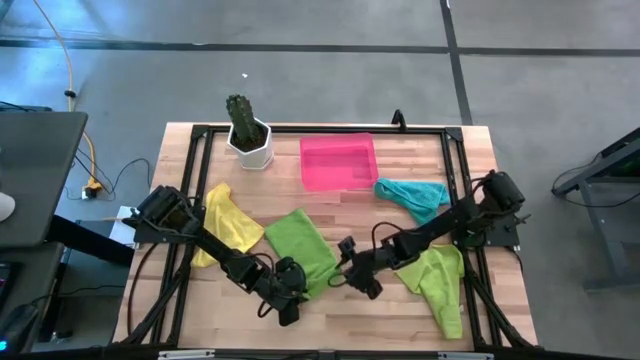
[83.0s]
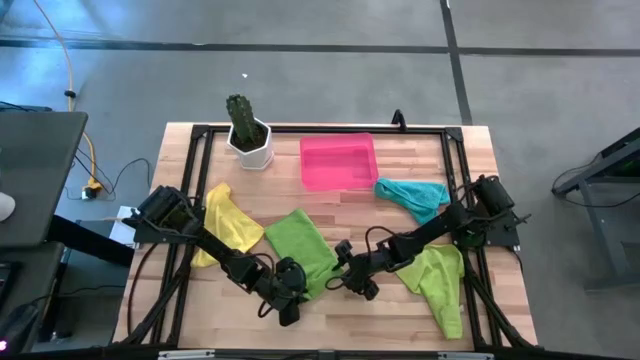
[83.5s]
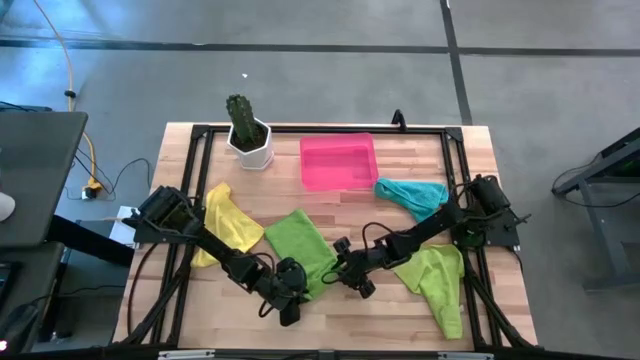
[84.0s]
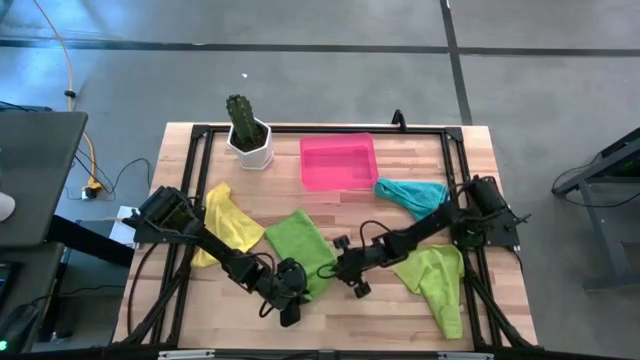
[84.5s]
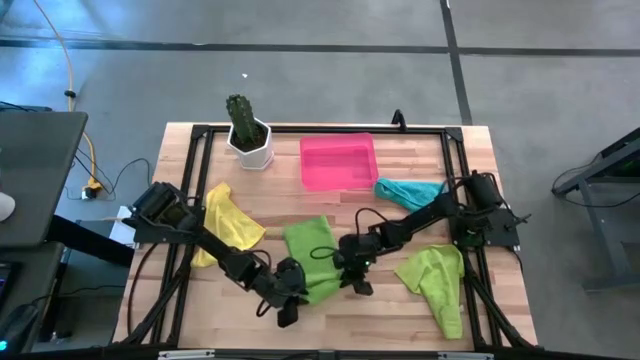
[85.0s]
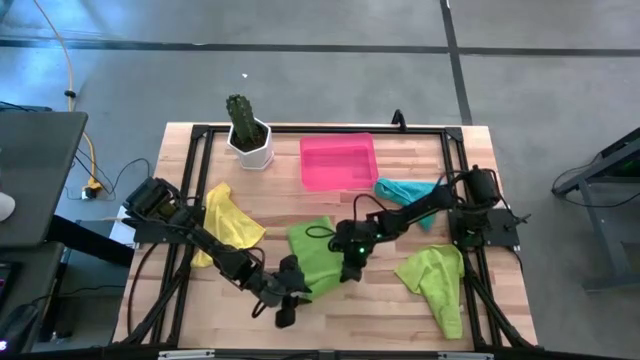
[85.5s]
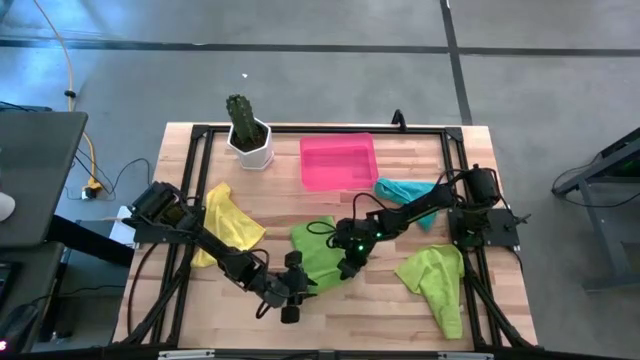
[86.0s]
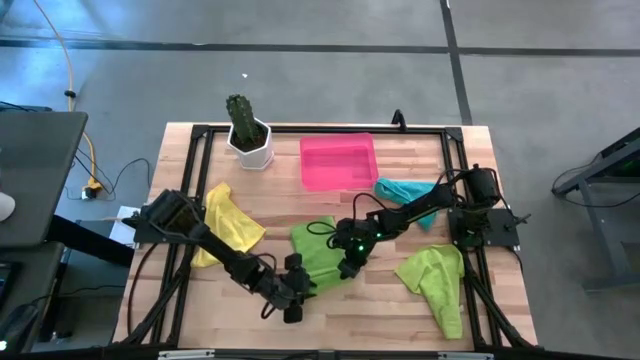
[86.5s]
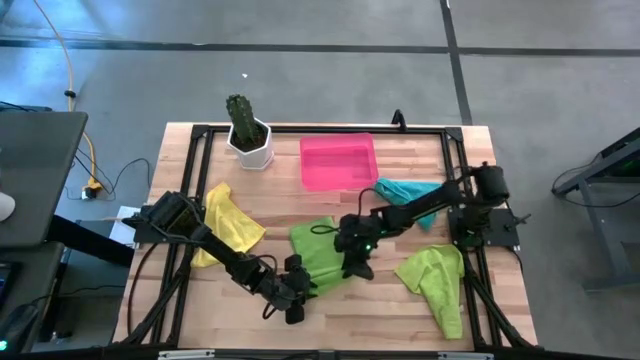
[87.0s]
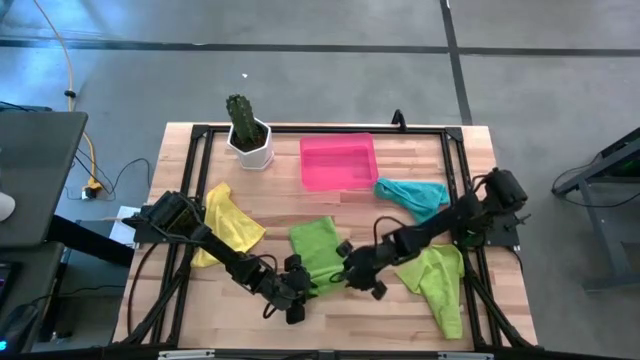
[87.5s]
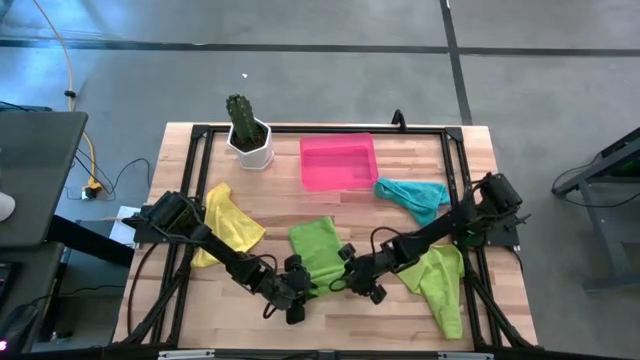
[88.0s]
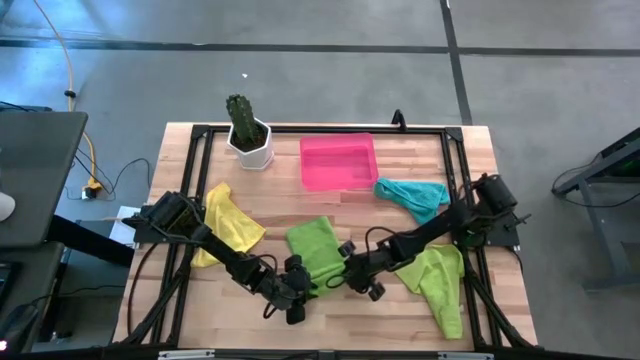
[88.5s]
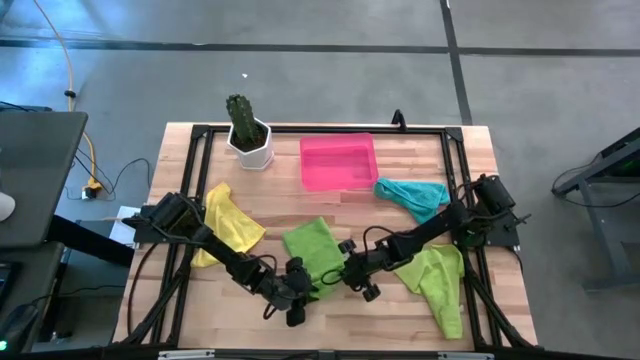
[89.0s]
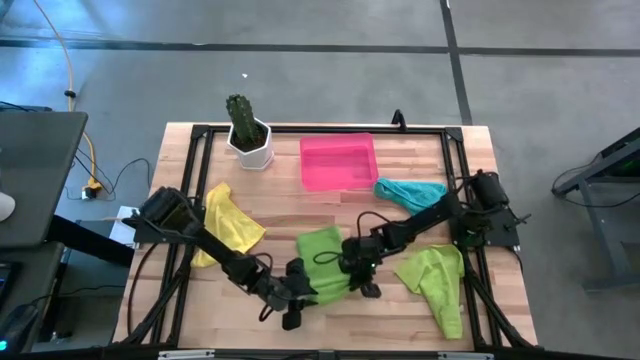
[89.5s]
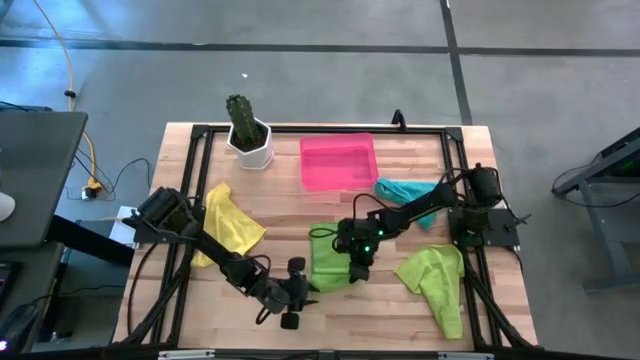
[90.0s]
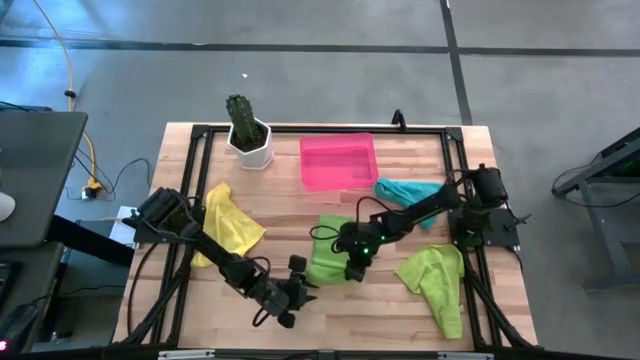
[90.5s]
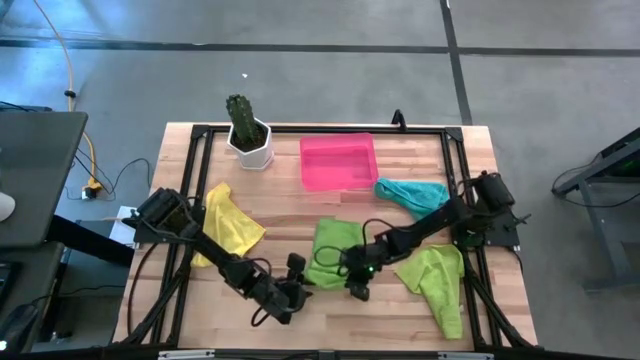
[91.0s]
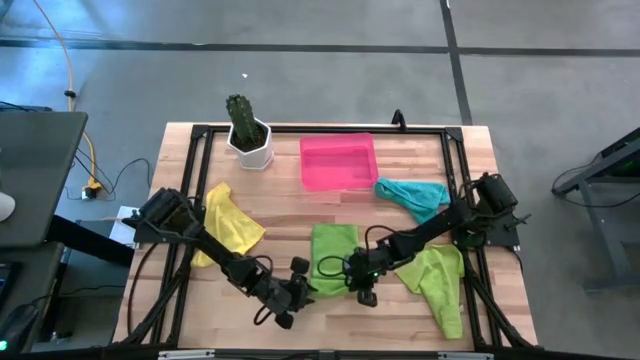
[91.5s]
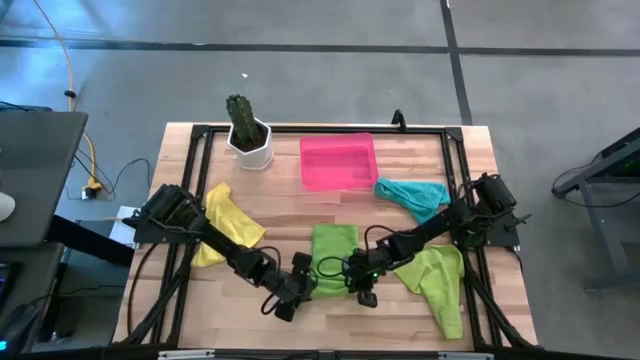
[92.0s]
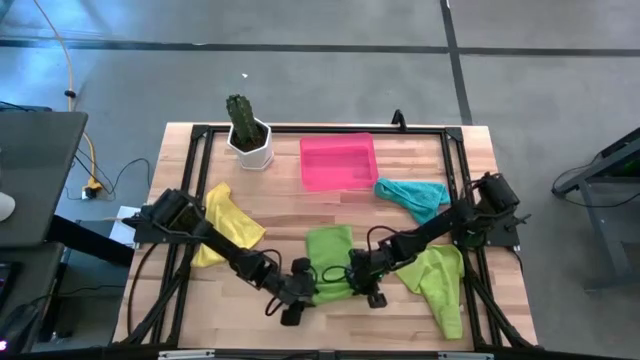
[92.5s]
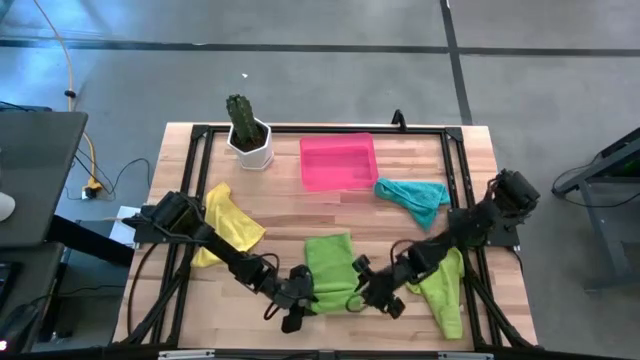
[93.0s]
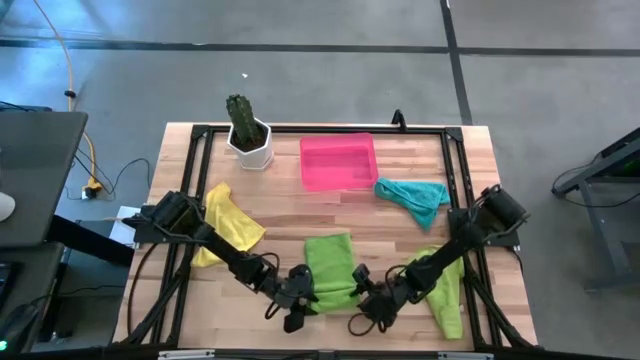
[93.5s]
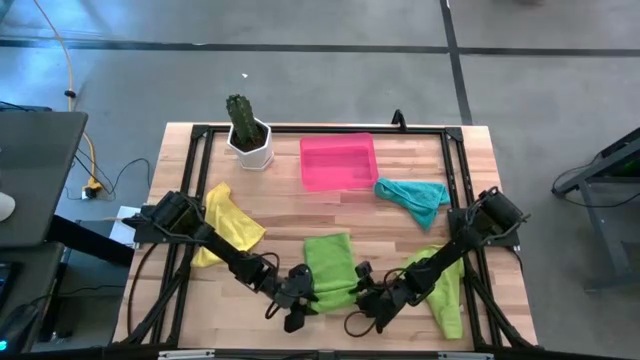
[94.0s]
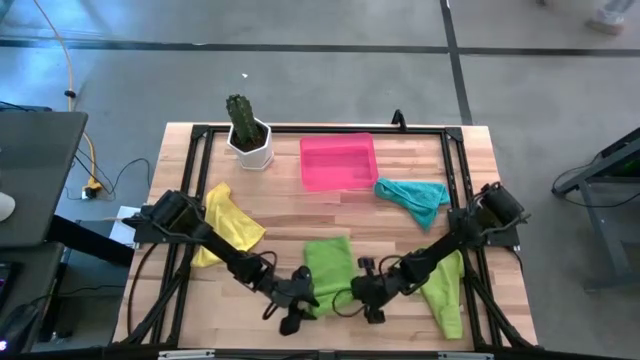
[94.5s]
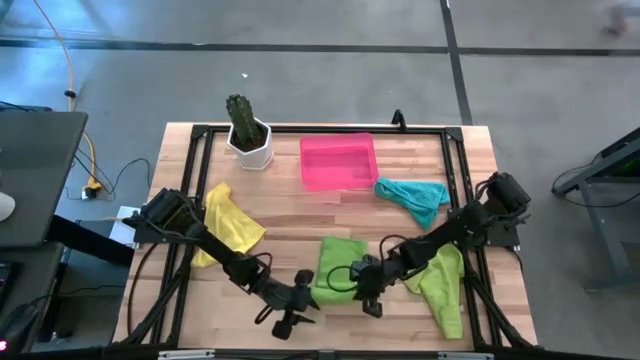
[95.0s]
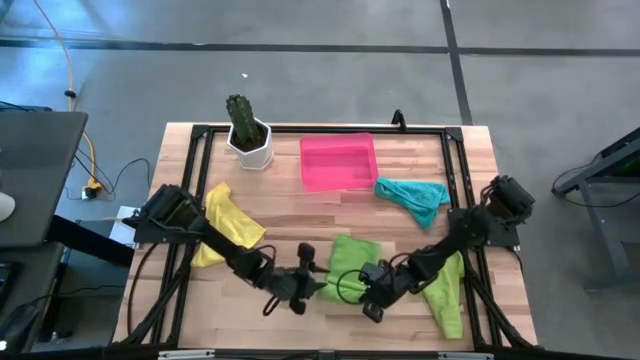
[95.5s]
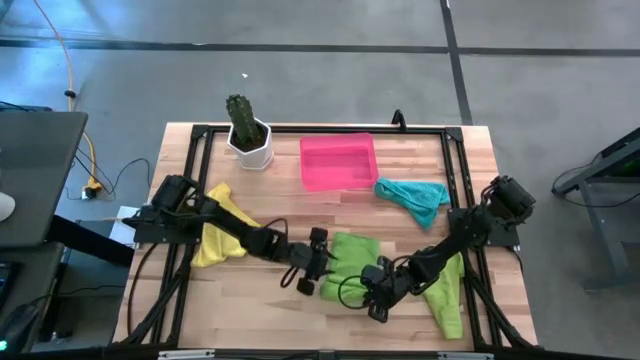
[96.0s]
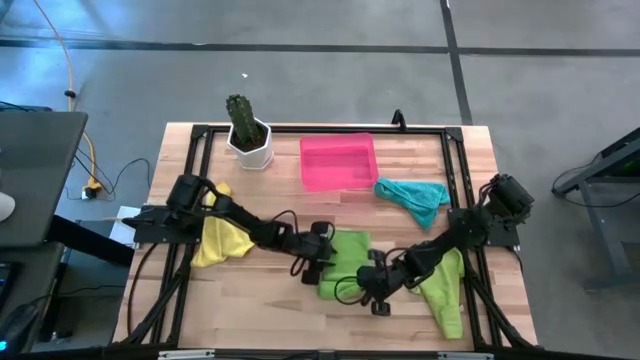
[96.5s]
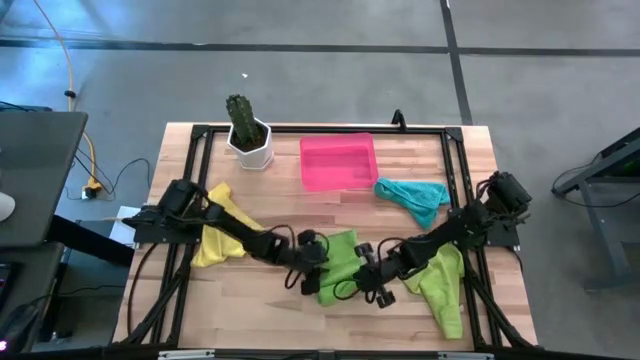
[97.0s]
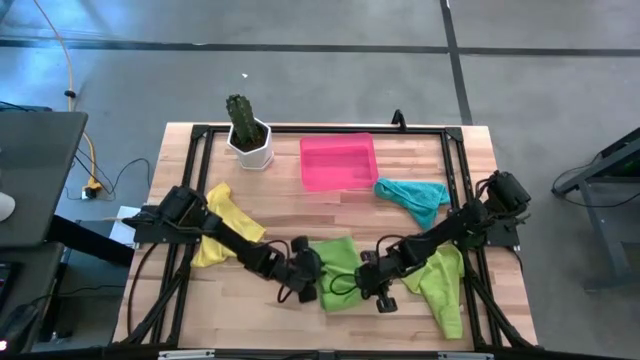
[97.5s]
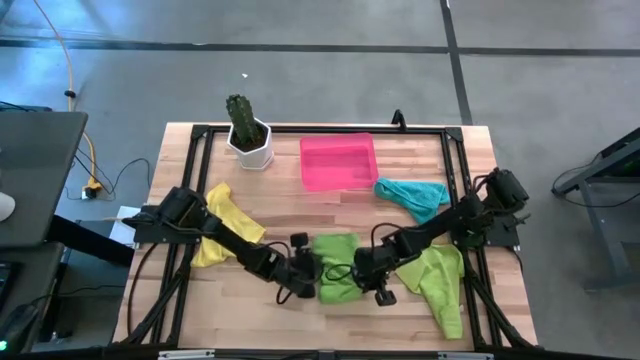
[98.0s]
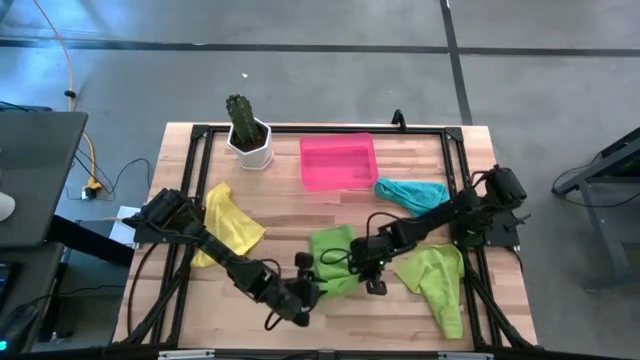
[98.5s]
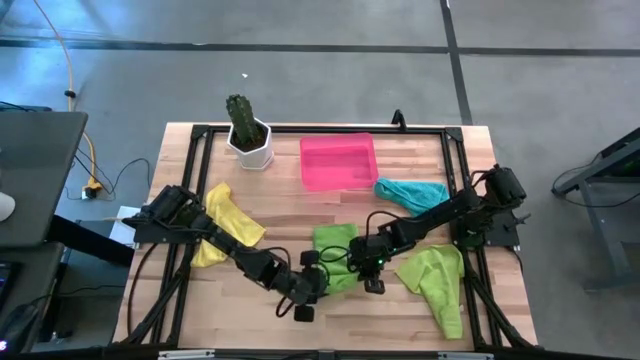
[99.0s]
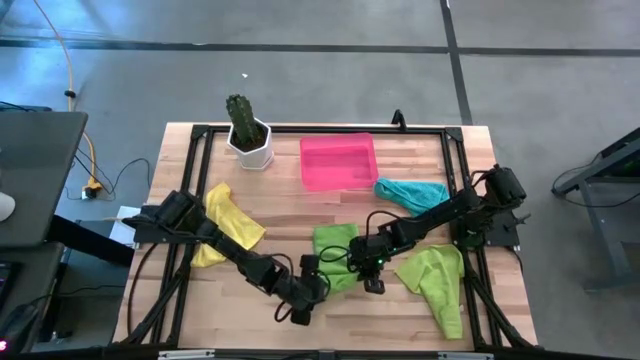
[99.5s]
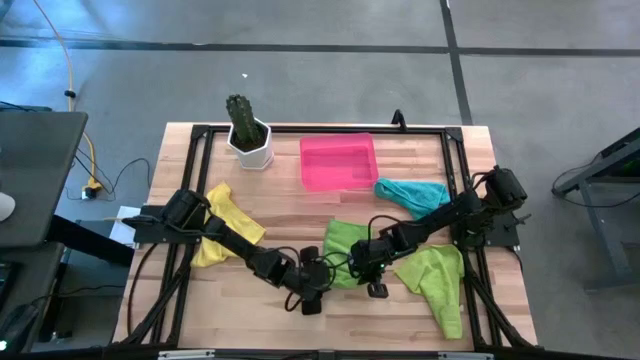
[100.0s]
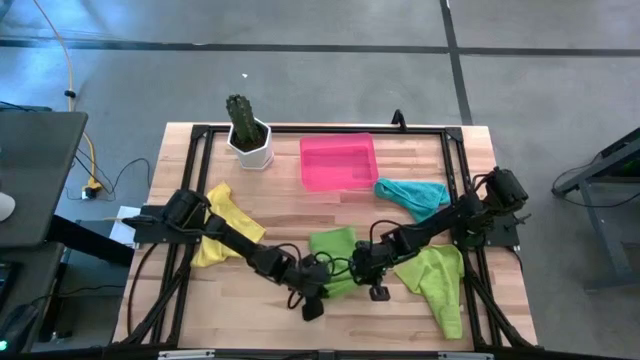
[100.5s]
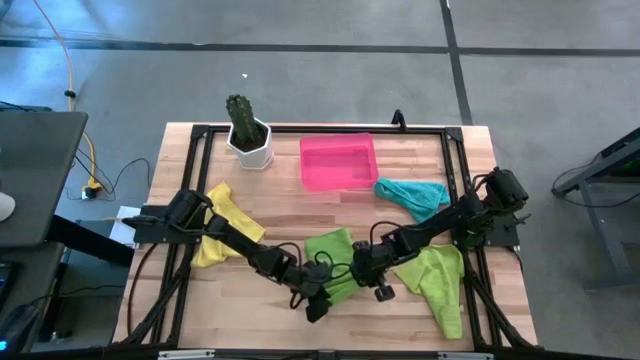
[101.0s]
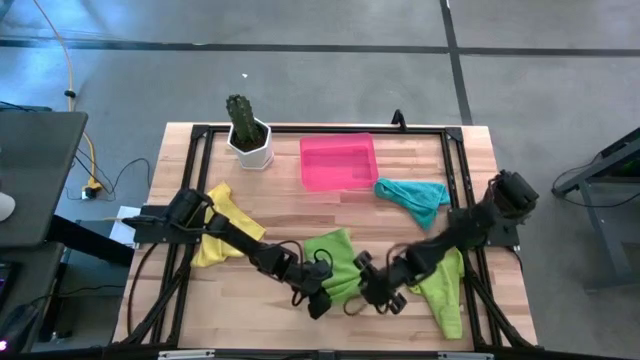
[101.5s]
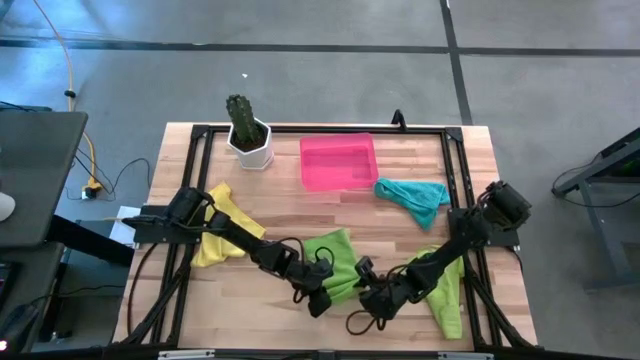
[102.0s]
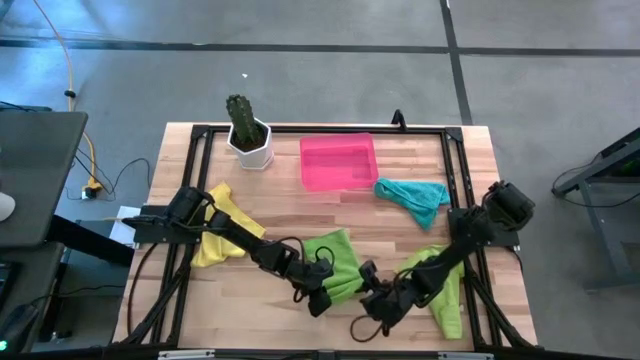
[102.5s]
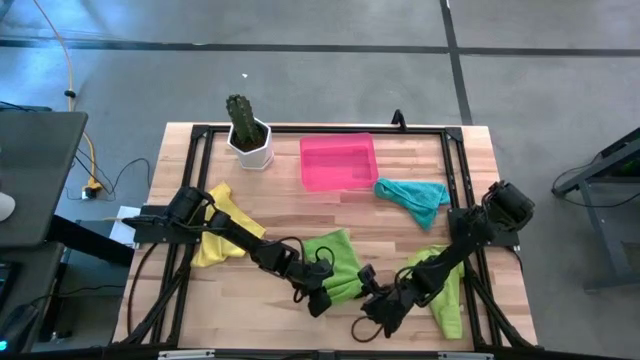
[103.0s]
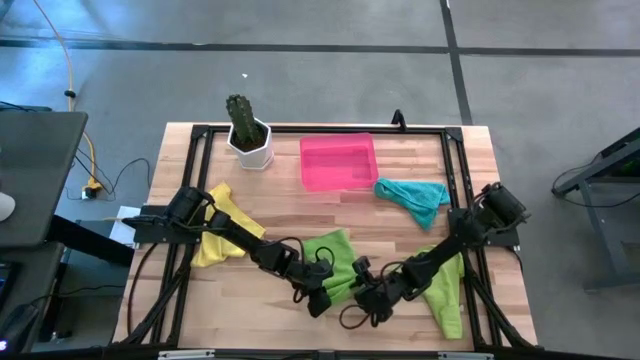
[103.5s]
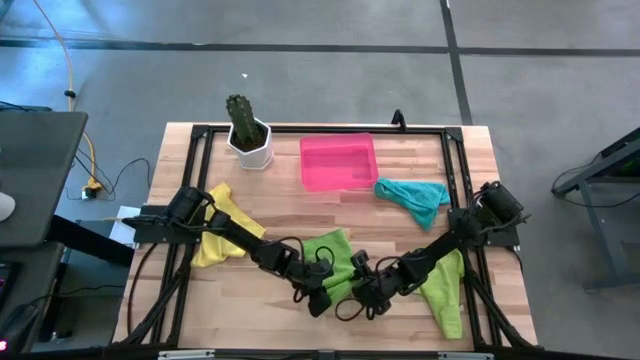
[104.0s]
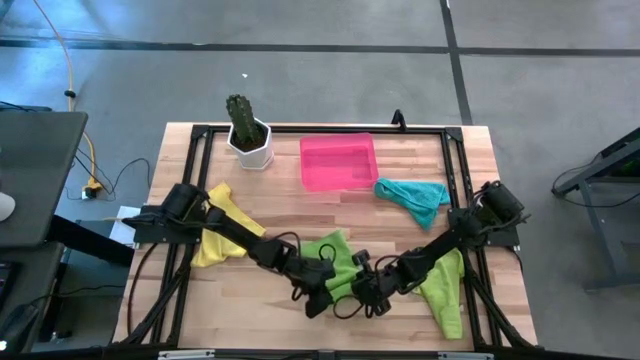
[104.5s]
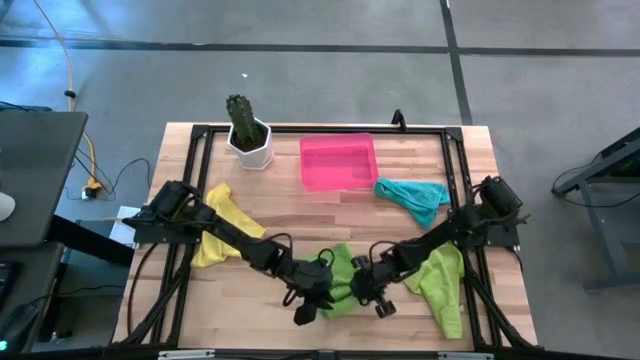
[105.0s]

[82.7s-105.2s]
Task: Roll microfiber towels into tight, uniform cylinder then place into a basket
Roll the green microfiber cloth
